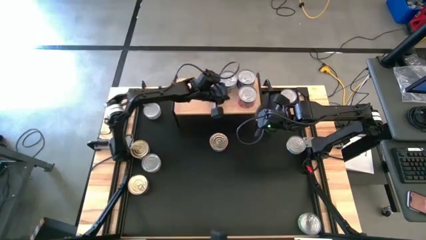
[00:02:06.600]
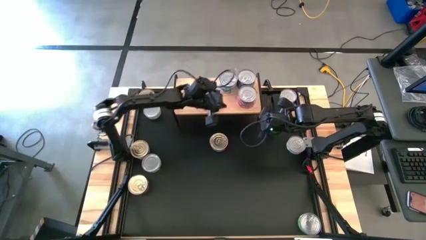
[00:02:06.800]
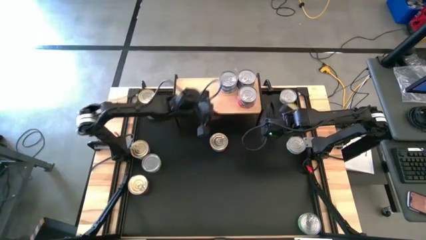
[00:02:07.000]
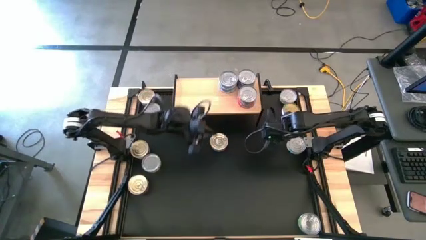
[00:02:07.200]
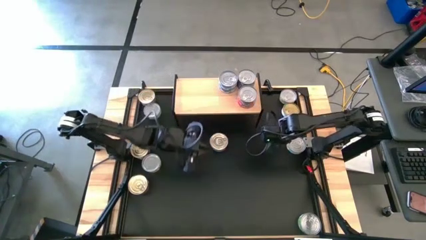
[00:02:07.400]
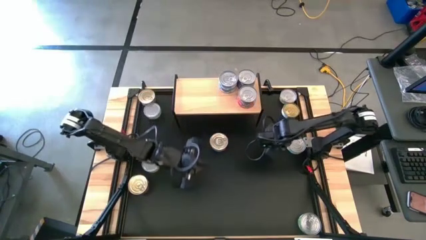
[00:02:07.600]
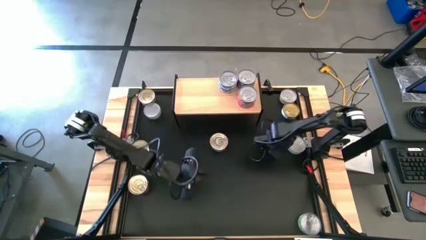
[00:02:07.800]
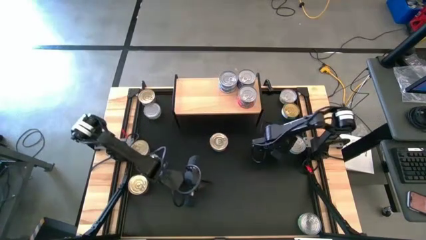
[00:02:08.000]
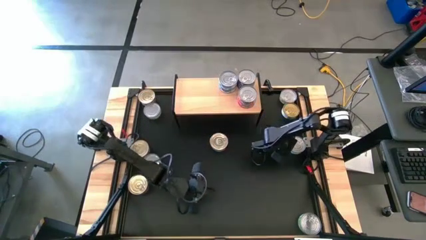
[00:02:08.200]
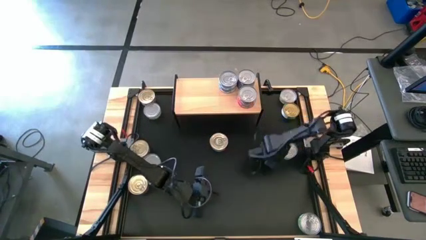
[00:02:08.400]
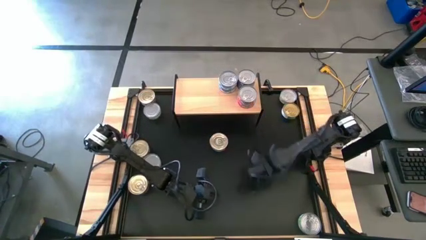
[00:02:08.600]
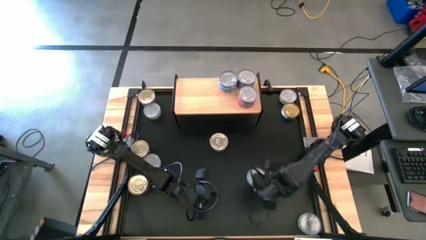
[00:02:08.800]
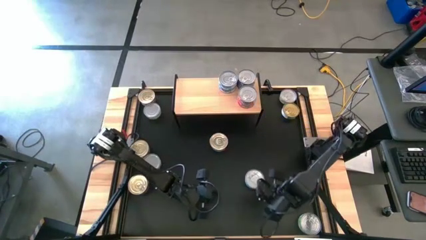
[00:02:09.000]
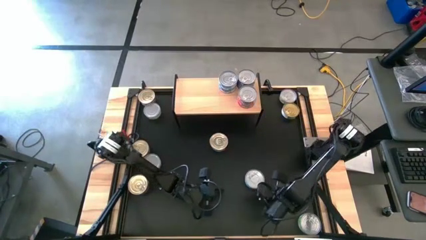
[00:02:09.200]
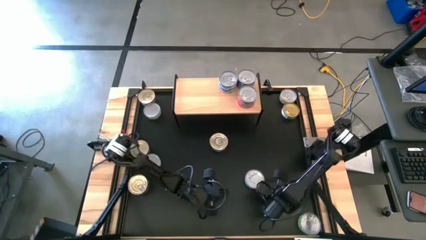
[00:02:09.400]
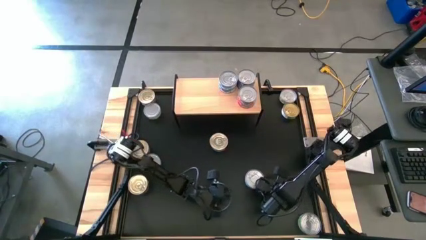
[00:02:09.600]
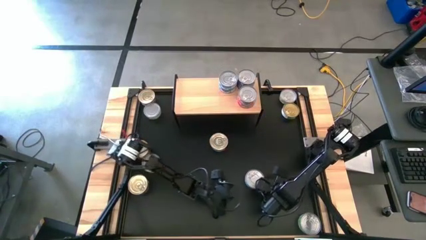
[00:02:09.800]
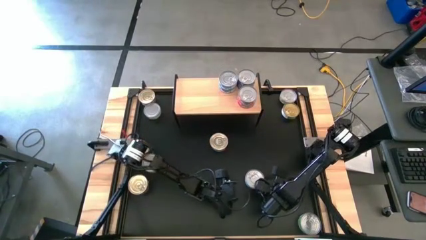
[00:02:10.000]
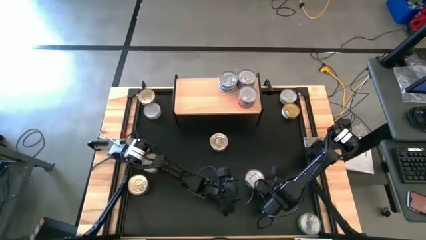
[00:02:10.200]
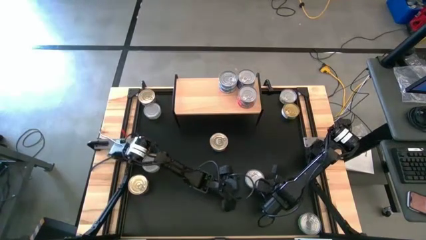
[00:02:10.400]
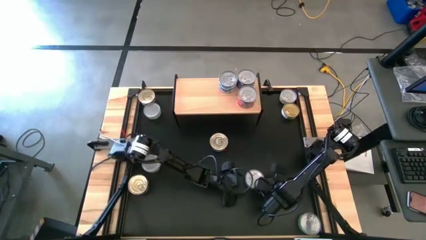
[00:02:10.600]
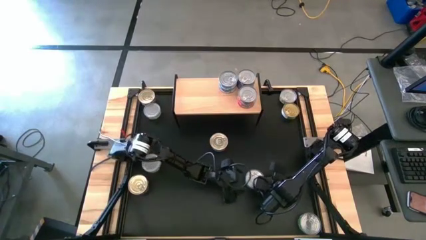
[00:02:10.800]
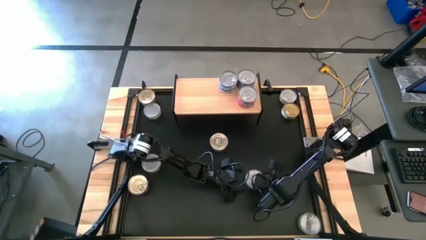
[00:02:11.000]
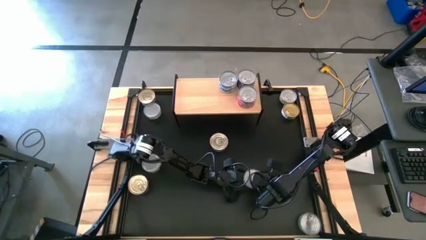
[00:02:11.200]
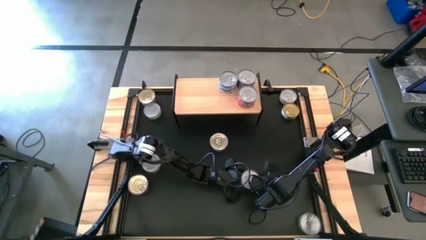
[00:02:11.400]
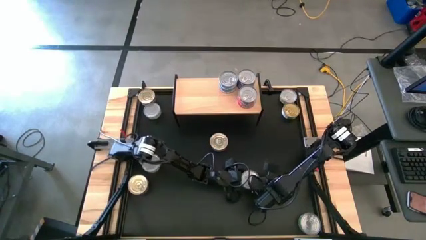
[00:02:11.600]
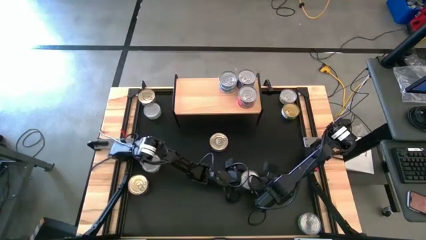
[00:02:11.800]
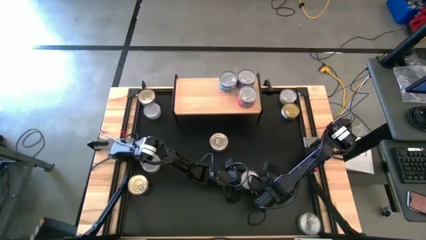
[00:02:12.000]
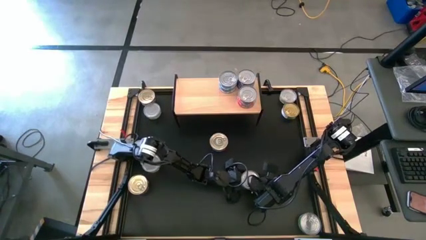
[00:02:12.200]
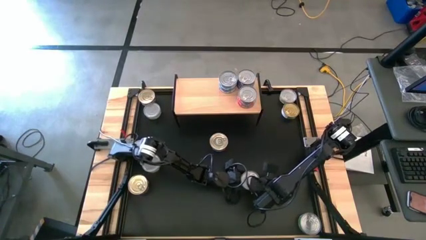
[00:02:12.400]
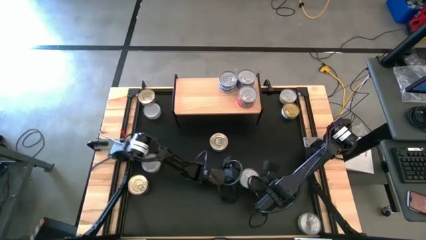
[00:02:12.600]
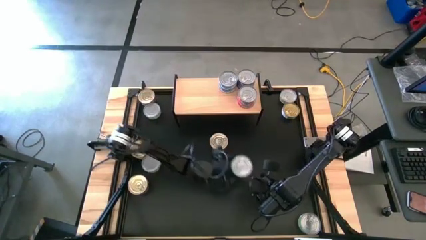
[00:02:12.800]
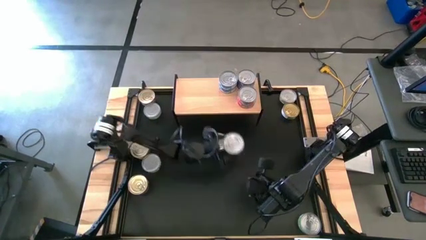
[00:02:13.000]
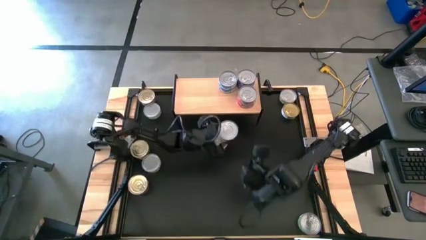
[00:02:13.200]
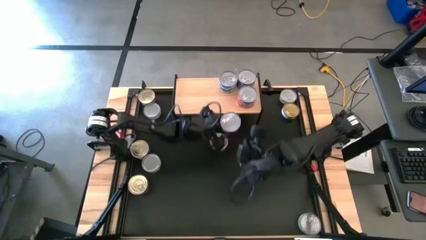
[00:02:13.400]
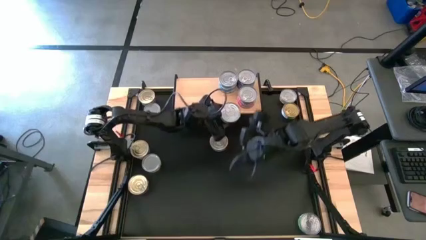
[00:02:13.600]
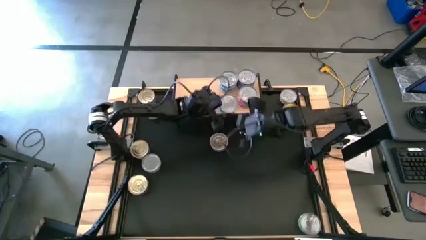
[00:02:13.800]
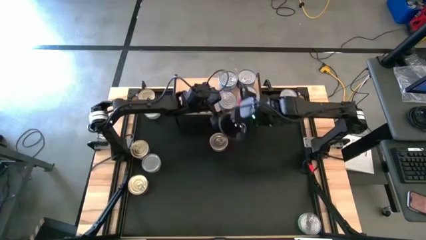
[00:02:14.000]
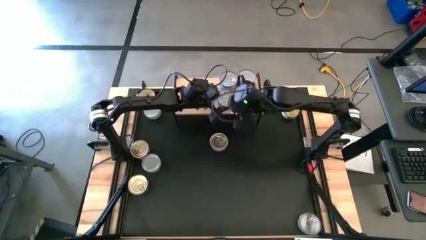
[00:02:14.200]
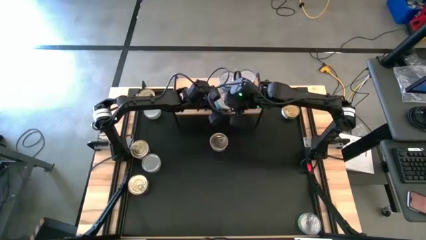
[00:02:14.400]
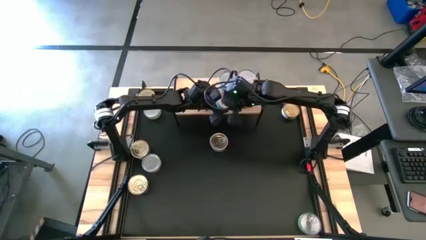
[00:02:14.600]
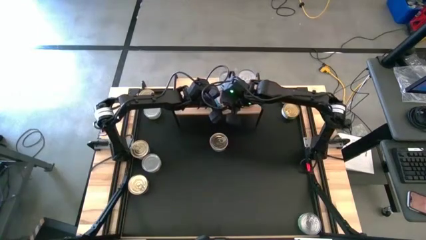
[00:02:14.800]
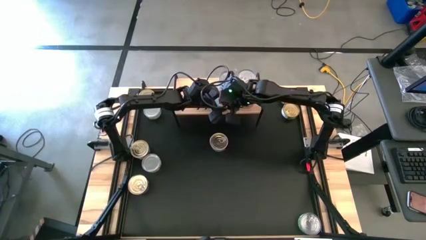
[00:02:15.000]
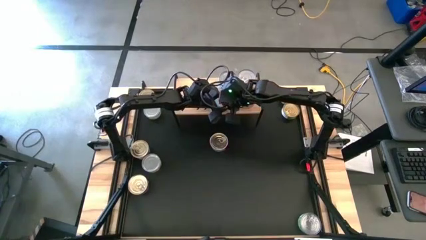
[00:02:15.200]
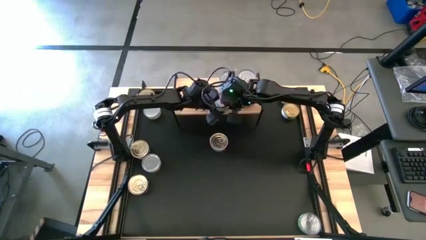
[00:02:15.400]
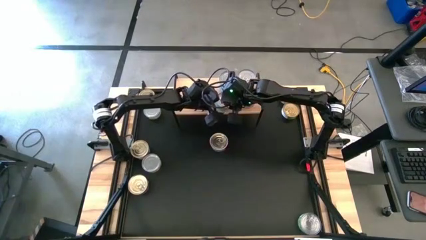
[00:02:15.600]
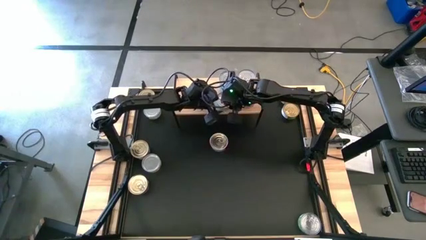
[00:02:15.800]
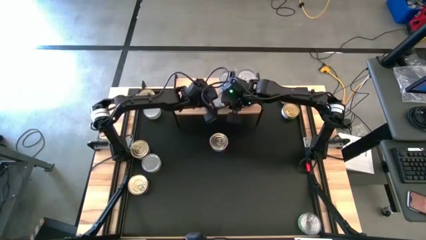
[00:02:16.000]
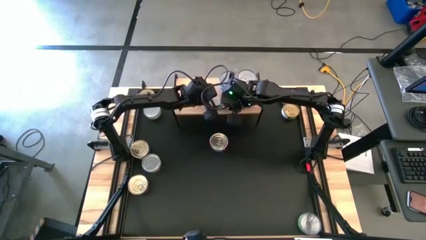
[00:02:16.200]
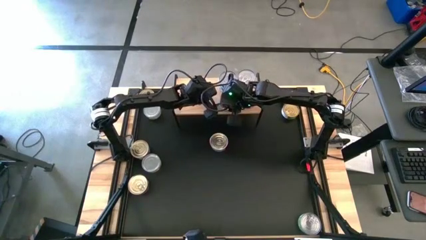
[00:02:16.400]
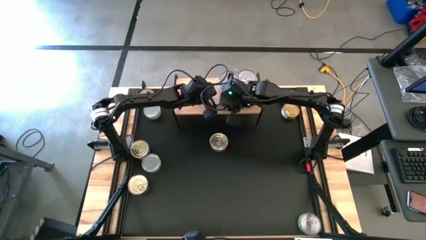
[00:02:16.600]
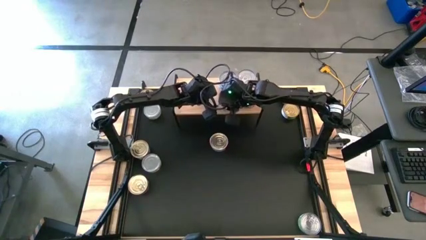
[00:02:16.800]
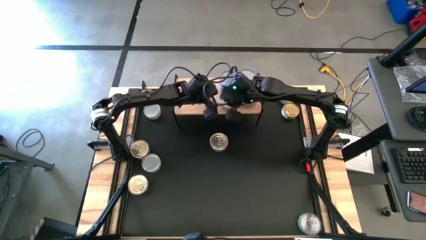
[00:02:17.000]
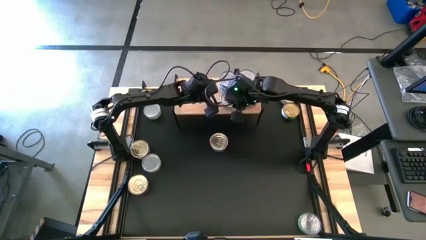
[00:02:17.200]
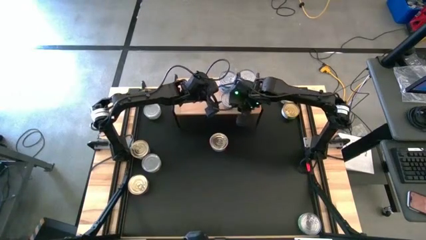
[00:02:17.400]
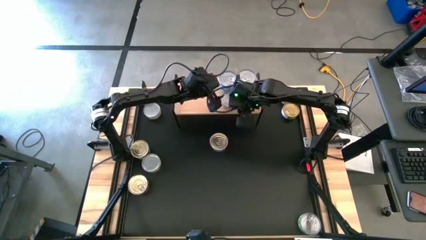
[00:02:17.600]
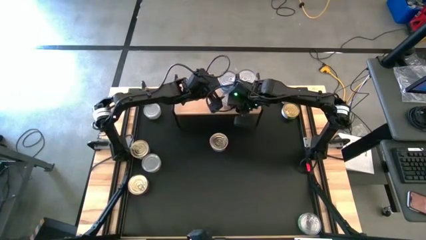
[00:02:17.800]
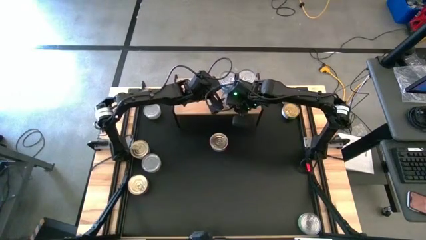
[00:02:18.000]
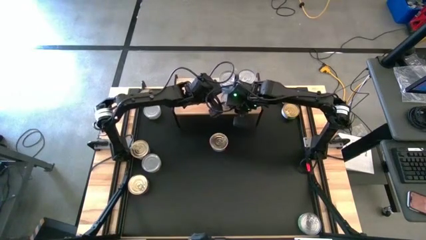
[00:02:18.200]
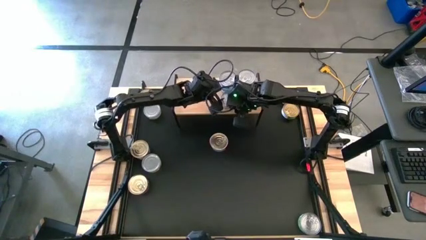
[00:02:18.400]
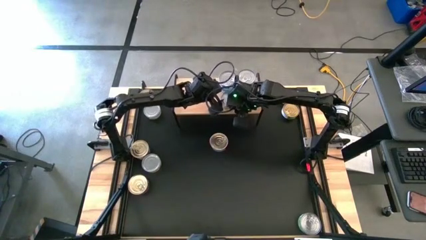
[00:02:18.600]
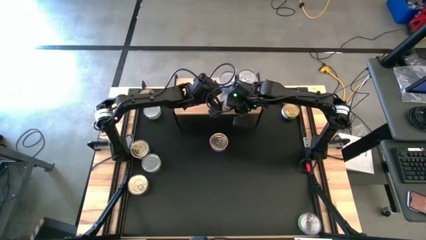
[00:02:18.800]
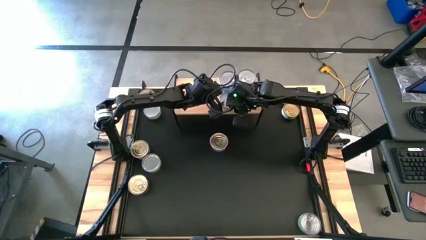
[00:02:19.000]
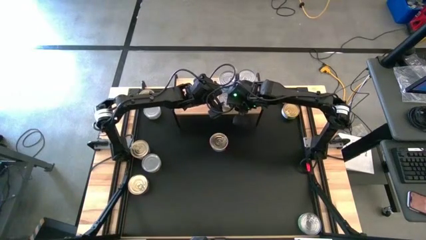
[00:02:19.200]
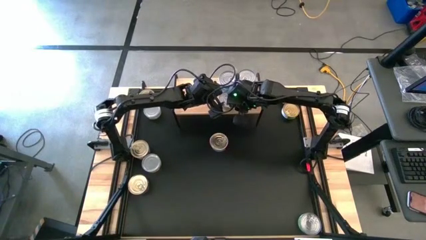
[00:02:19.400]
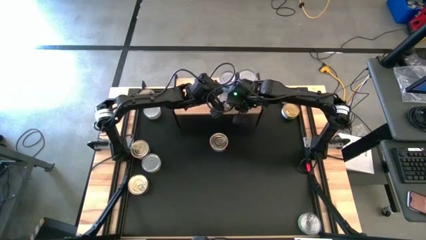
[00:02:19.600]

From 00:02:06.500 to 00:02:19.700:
Task: Stack canned seafood by type on shelf
Put the yellow blue tuna can on the shelf
